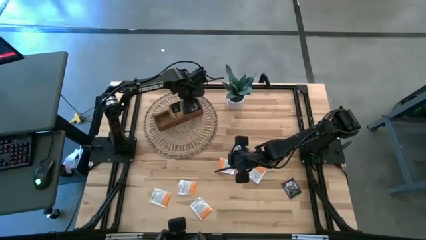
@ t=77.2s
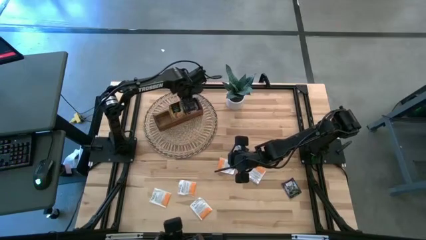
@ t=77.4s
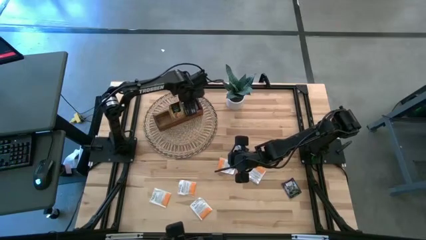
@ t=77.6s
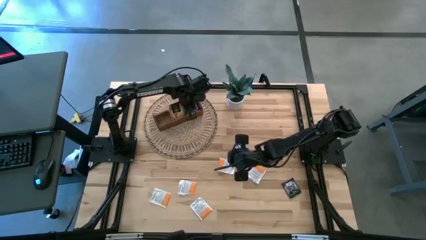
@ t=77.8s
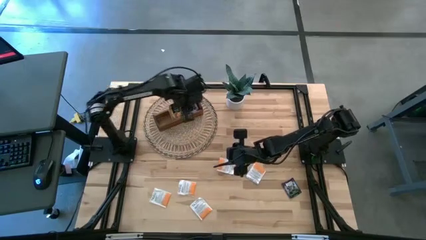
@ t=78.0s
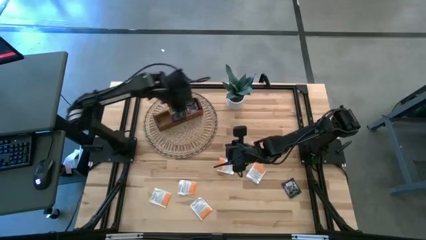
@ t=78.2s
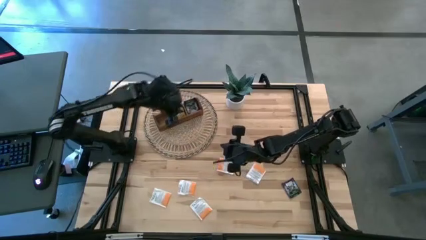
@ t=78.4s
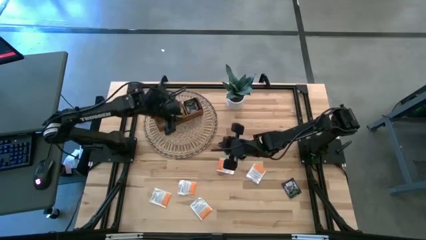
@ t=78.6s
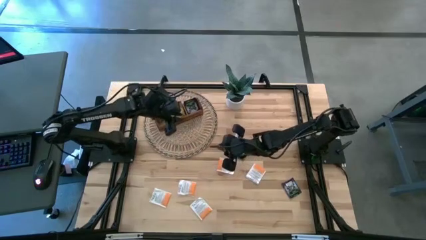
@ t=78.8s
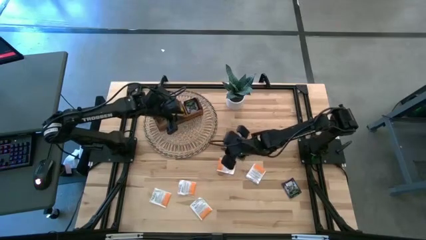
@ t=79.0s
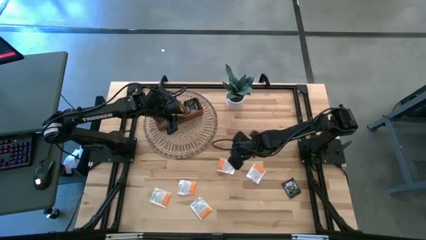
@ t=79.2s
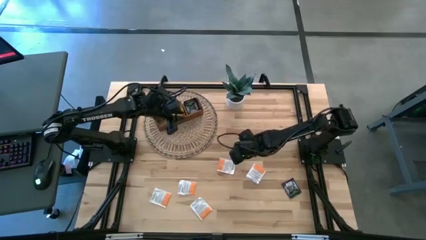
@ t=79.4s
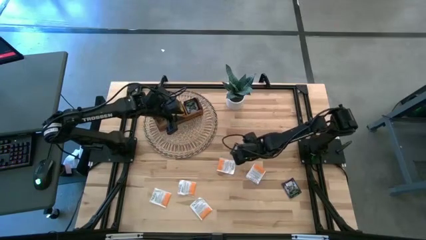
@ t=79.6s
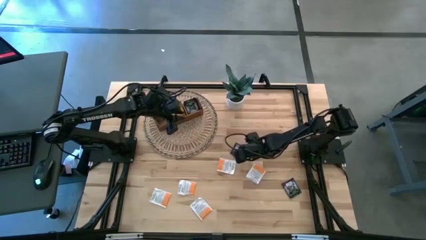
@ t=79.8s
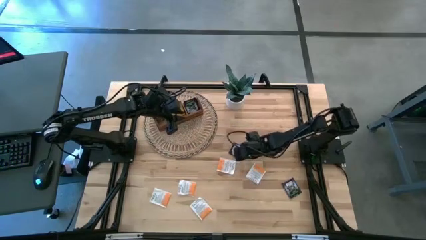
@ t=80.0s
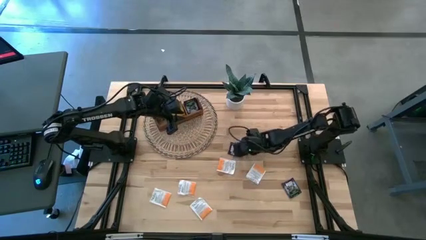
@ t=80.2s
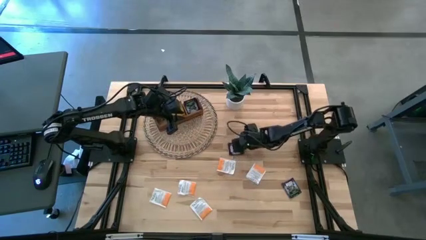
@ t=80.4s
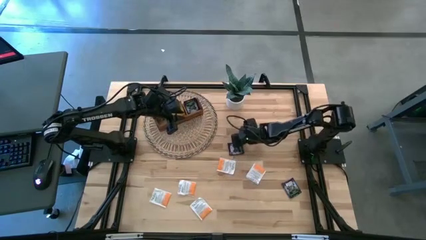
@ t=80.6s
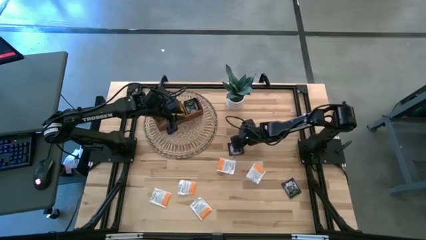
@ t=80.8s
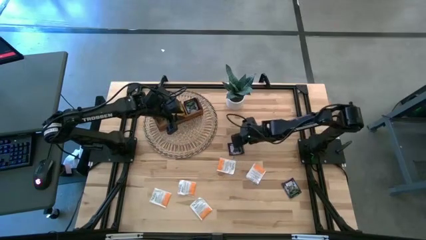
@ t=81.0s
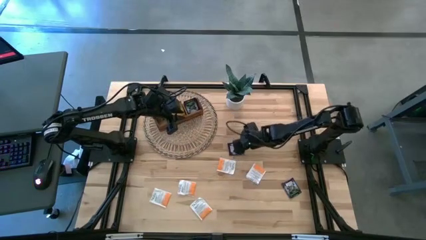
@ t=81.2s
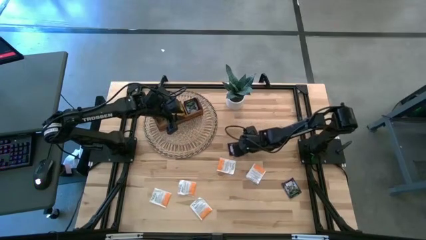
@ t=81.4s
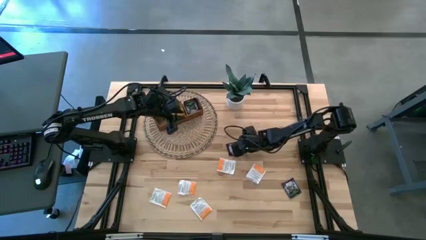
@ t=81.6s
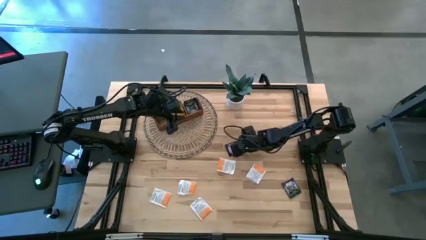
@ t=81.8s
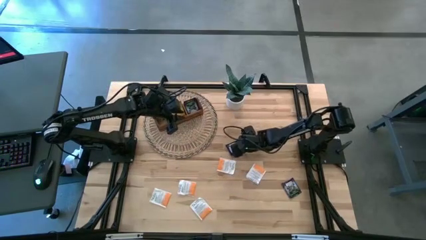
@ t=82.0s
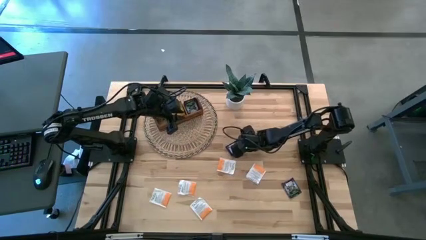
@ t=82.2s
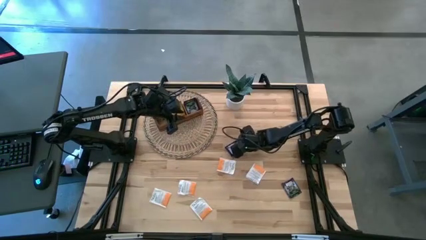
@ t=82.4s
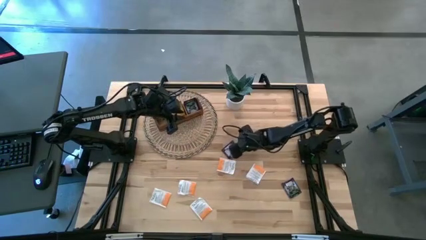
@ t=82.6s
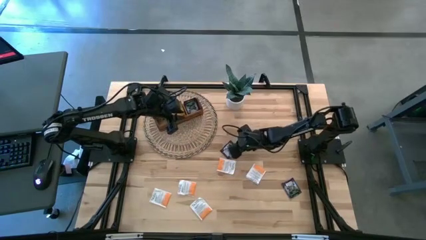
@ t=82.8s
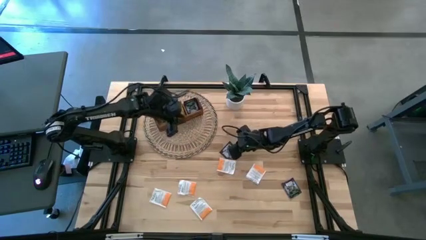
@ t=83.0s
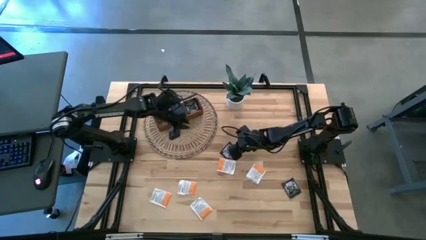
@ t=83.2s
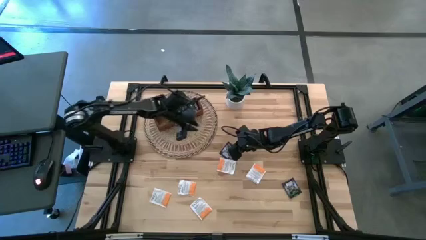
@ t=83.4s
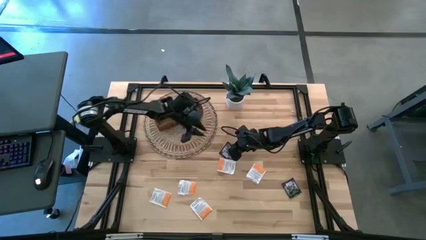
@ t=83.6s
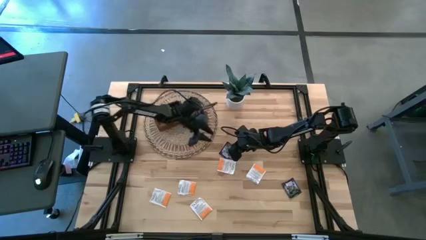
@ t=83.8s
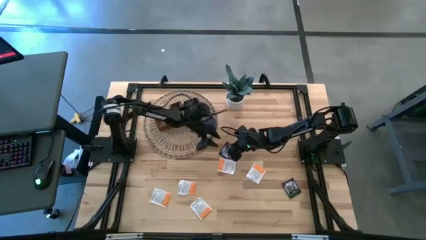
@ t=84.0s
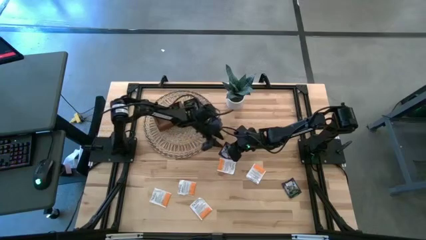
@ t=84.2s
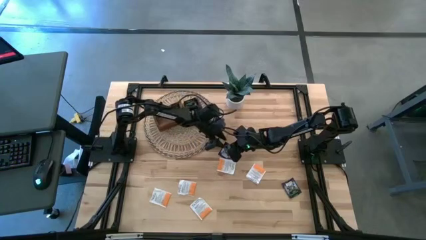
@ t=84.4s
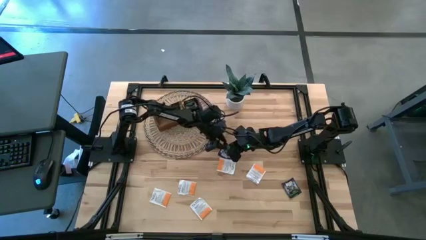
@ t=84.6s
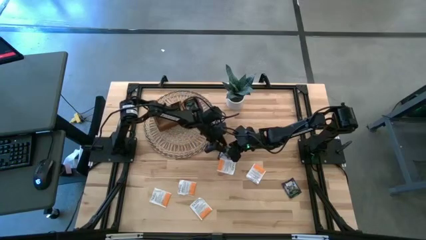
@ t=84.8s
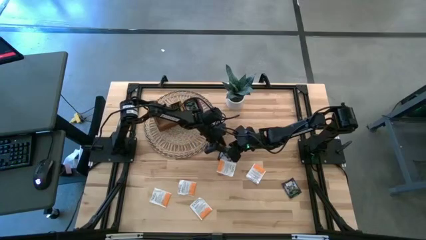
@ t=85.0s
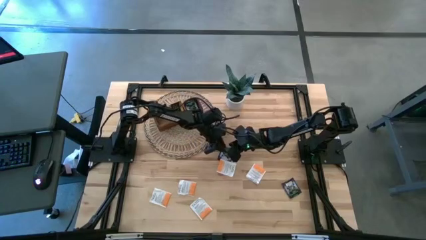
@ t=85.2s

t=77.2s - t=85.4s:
Task: Pick & Place Tea
Put the black tea bag into the right section of the wooden organizer

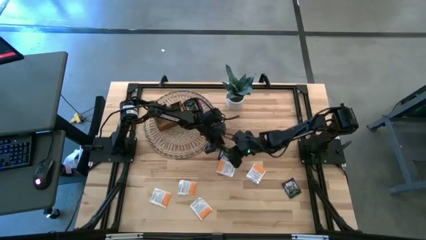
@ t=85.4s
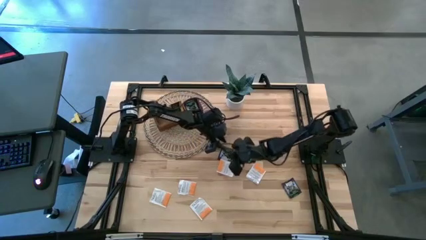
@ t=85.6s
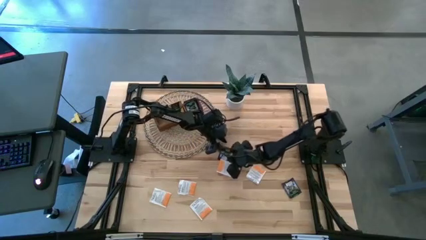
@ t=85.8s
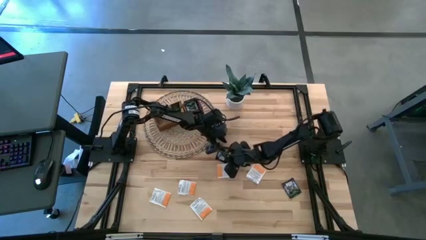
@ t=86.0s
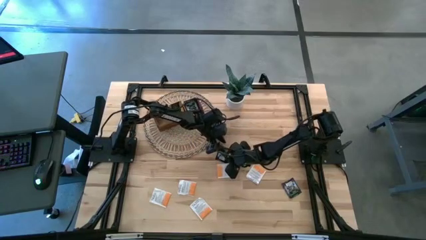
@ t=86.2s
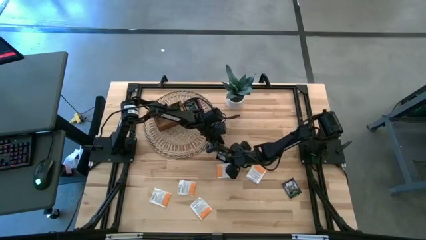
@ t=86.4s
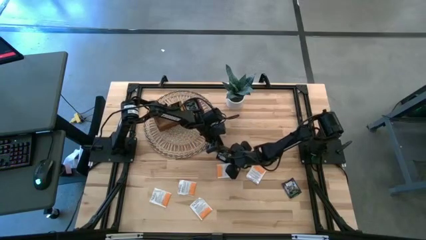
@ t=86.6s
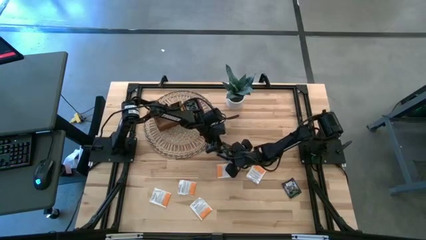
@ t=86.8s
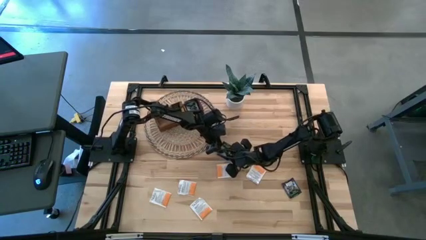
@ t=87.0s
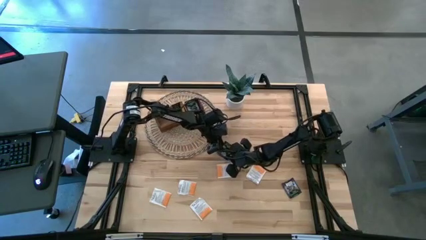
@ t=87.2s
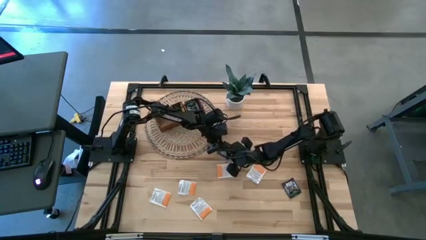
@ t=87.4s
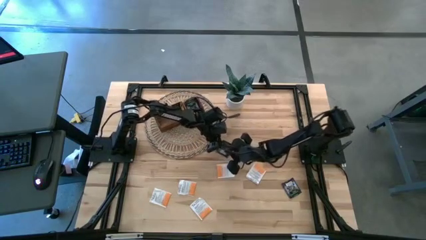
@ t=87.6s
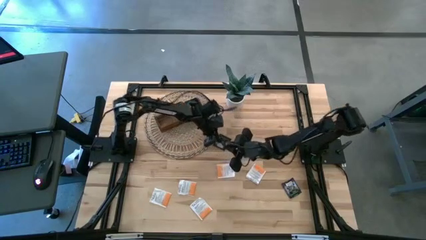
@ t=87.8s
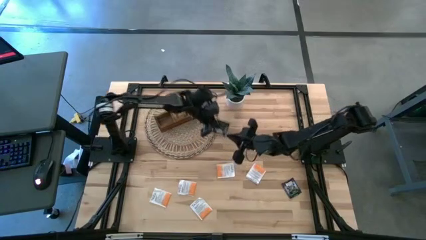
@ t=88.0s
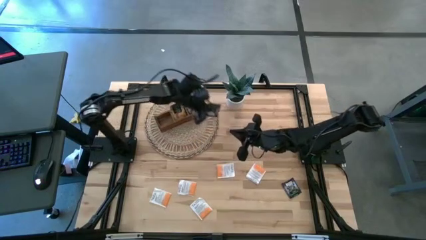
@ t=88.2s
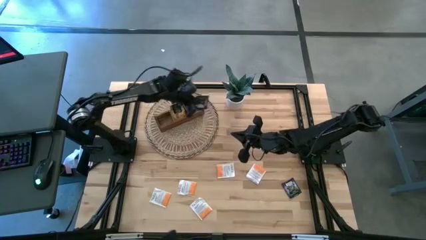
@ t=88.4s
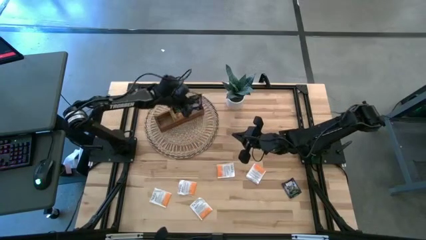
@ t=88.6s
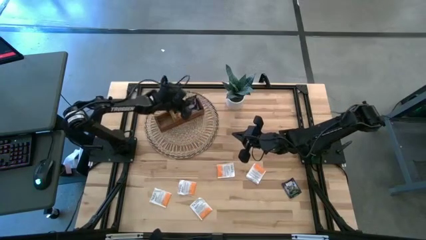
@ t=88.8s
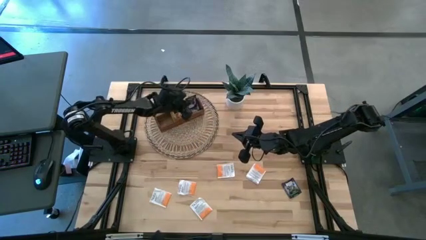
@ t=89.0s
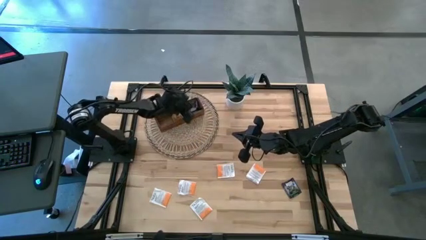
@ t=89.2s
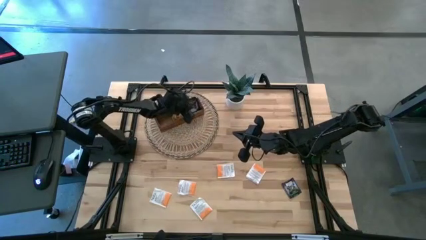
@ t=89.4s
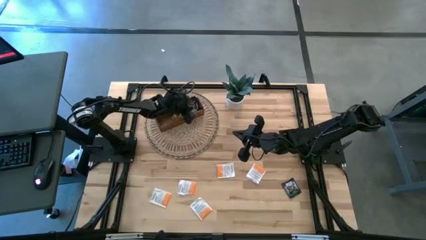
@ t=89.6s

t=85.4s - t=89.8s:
Put the black tea bag into the right section of the wooden organizer
